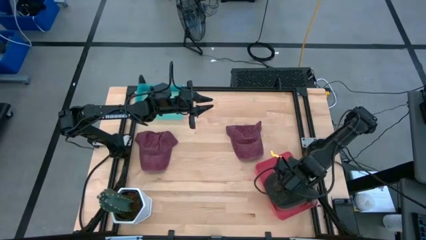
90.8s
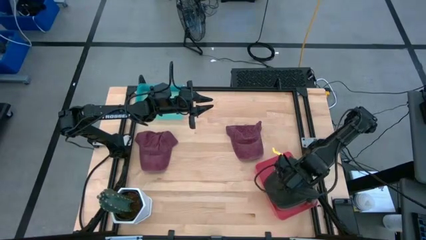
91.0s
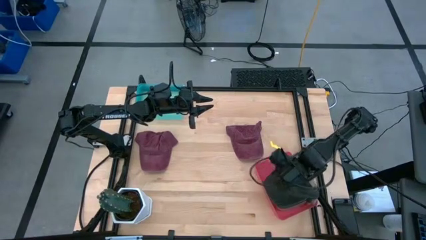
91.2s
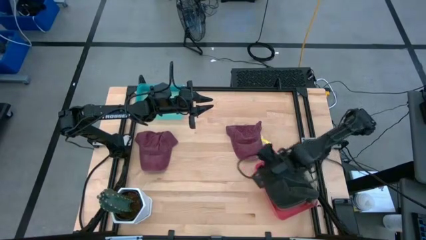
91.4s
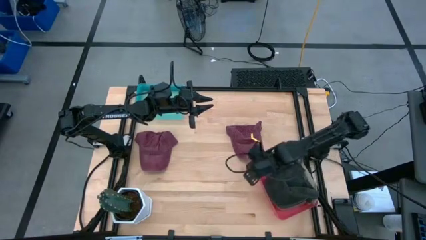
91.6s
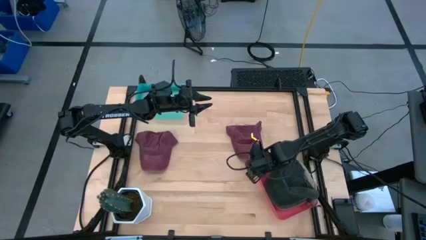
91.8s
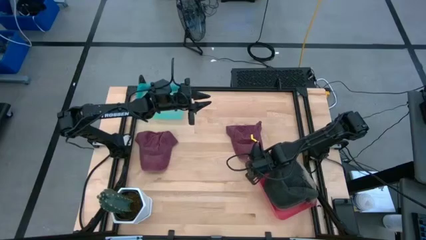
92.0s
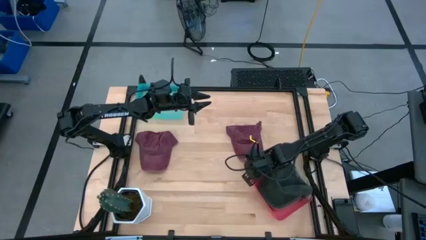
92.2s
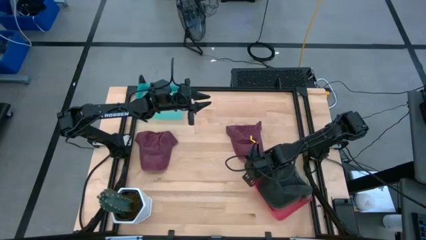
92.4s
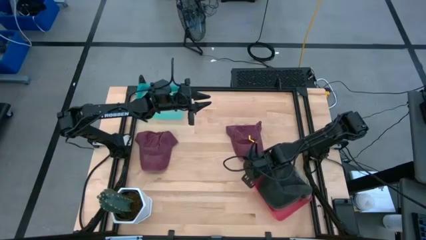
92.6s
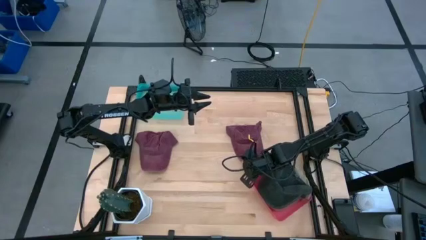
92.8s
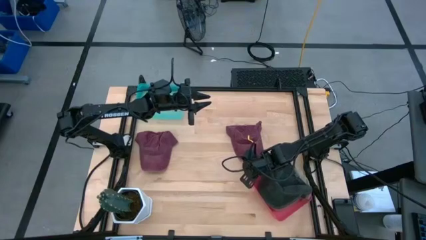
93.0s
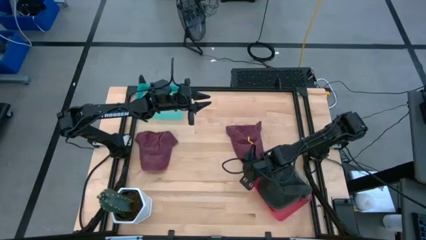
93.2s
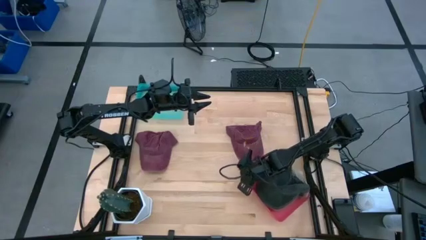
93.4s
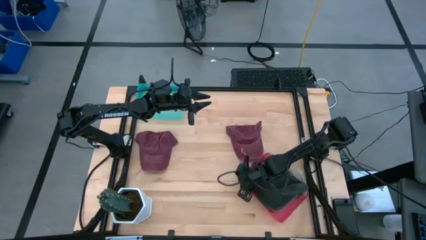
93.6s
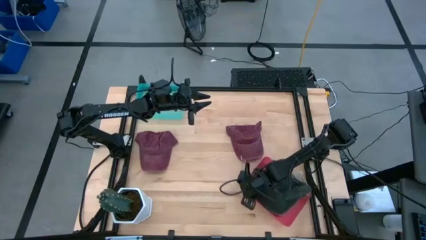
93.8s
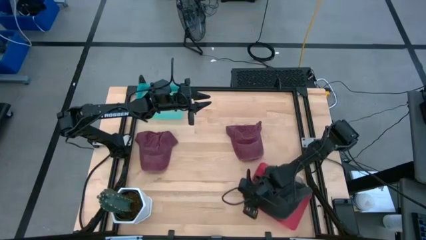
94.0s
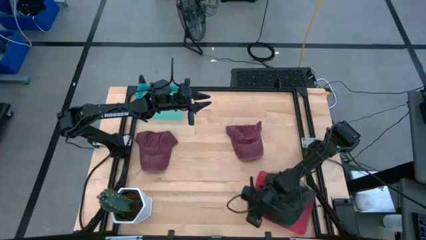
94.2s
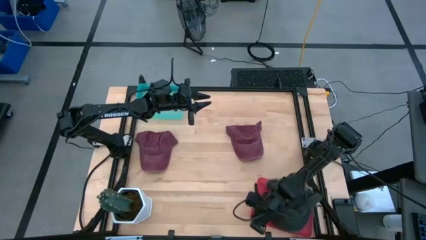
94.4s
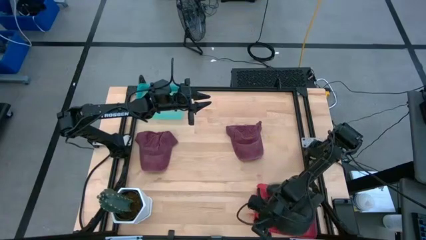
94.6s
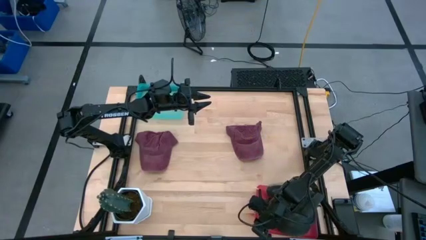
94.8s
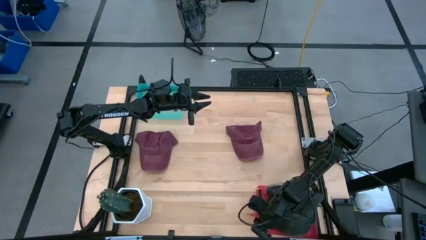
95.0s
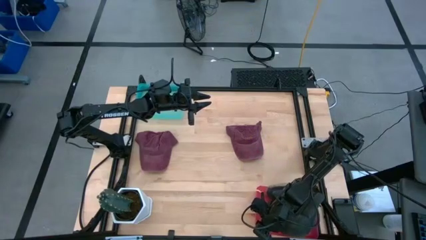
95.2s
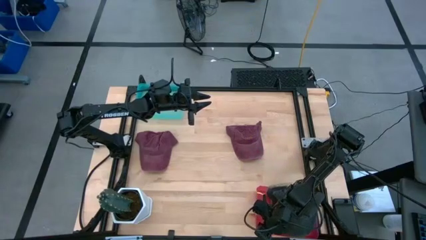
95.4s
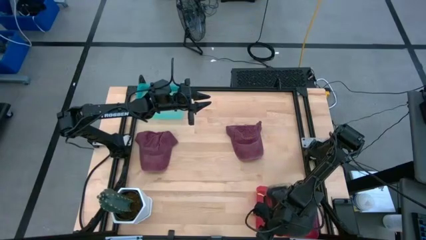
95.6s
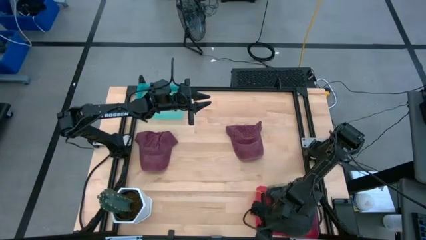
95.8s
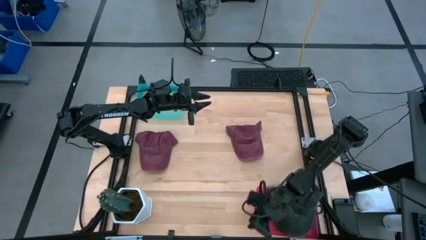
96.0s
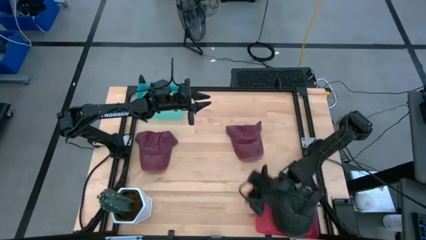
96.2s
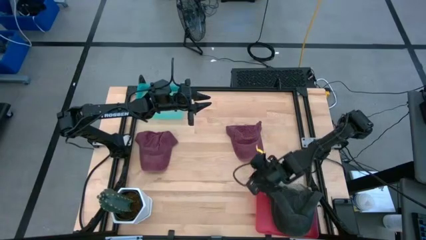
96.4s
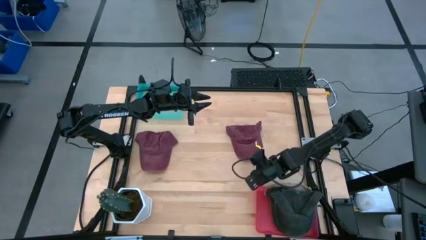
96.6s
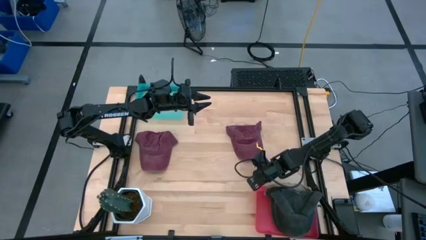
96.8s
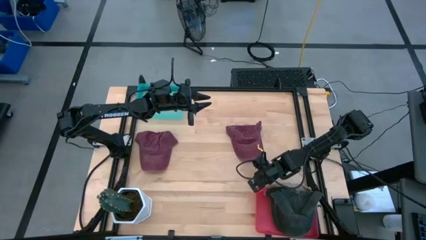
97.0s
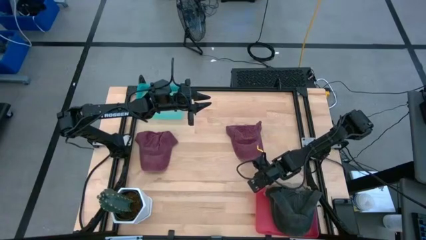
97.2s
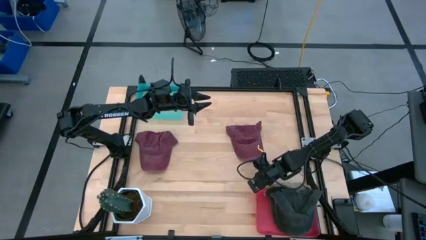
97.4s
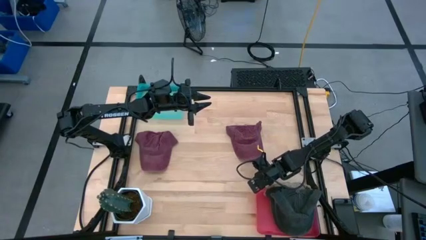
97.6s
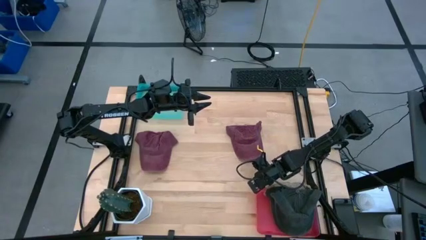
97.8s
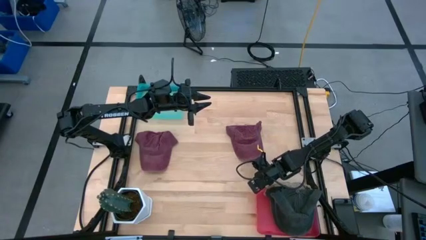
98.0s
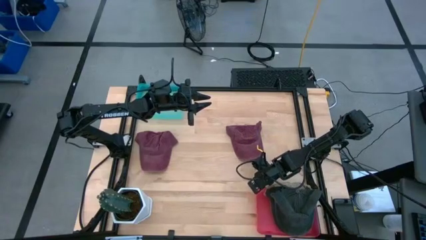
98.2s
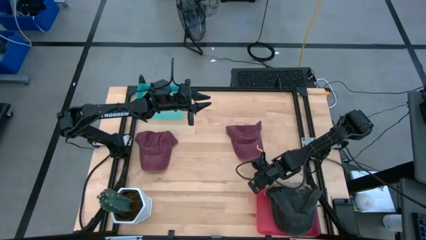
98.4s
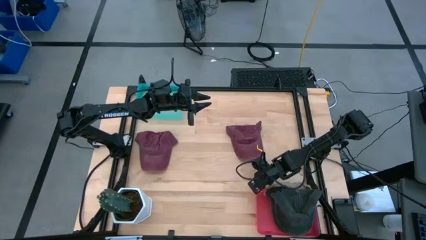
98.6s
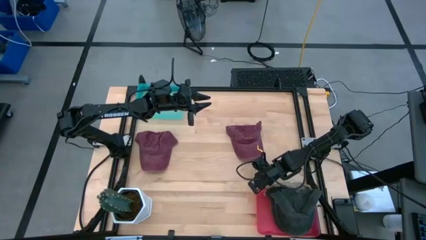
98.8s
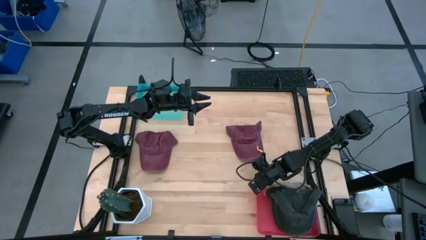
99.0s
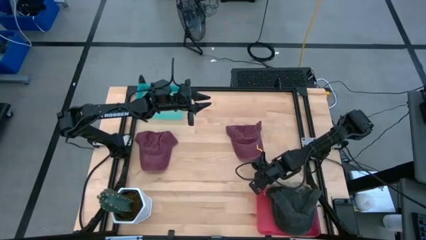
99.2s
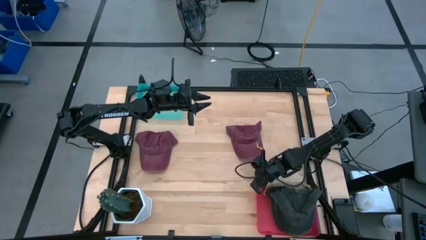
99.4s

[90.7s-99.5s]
Task: Pick & Place hat
Adjust the pink bin on the table

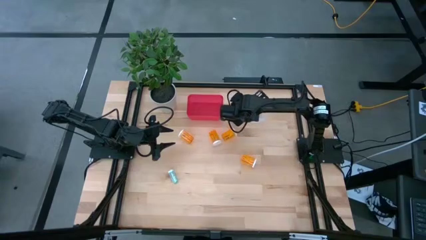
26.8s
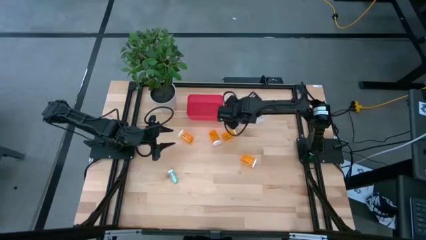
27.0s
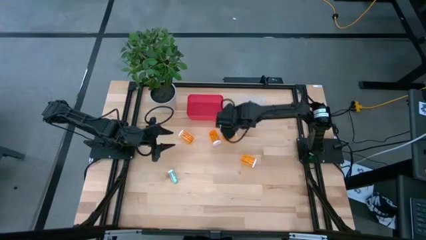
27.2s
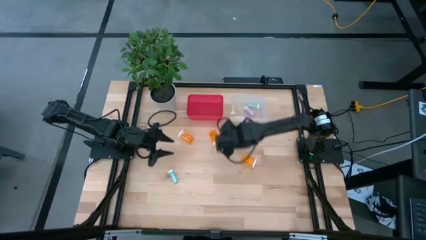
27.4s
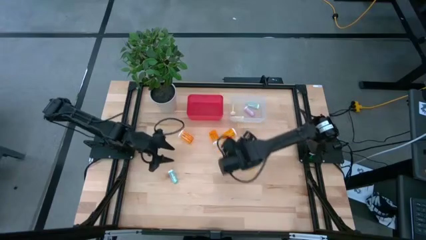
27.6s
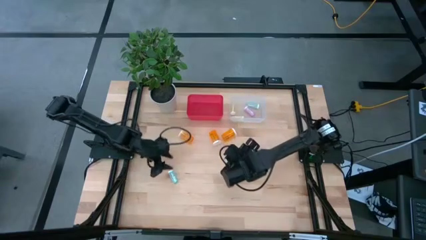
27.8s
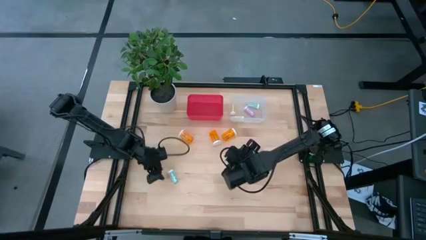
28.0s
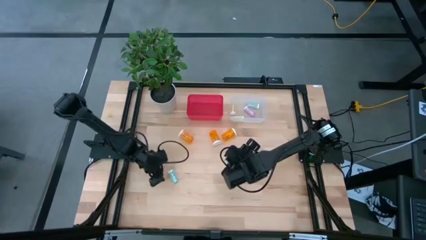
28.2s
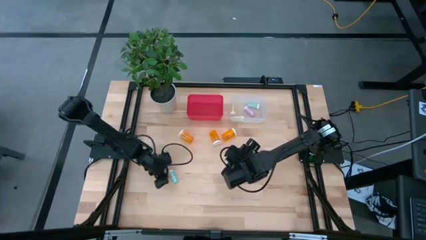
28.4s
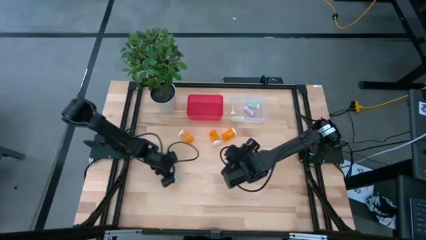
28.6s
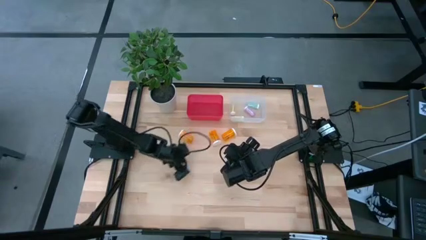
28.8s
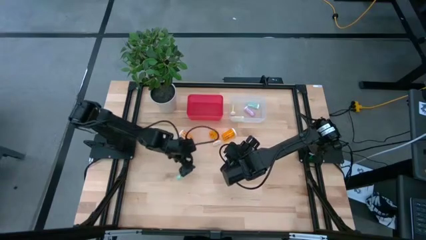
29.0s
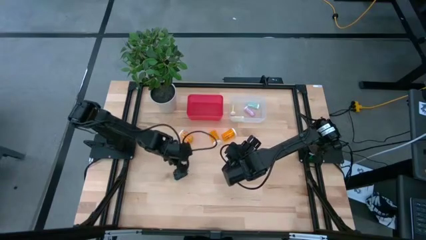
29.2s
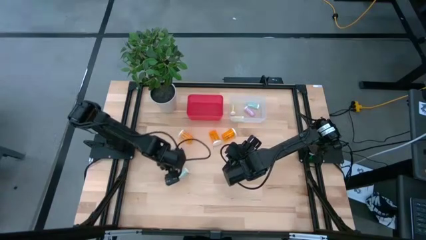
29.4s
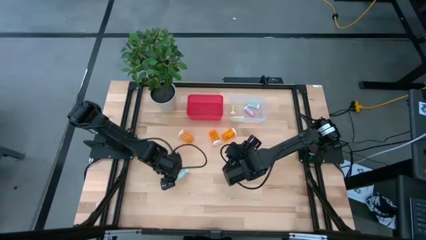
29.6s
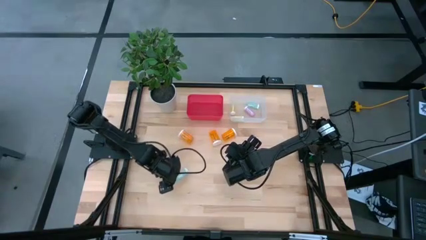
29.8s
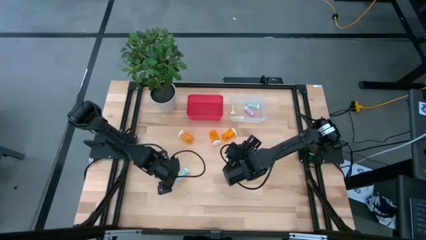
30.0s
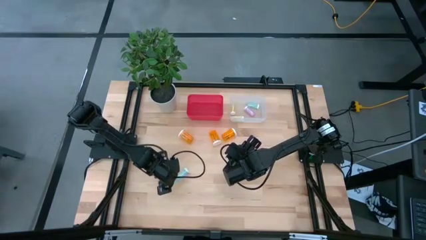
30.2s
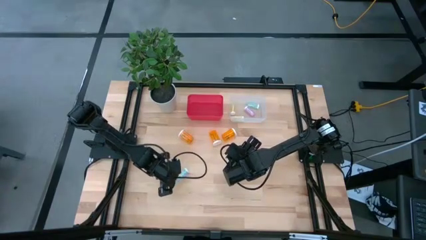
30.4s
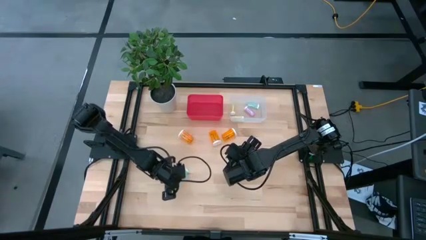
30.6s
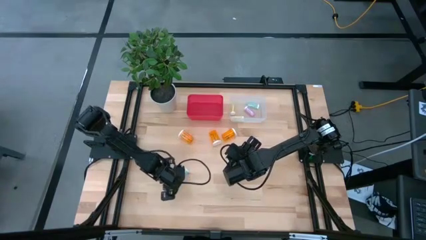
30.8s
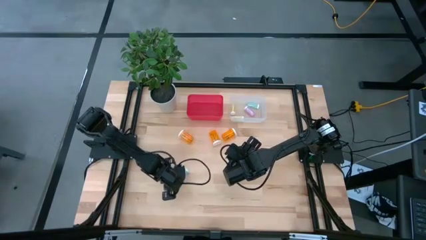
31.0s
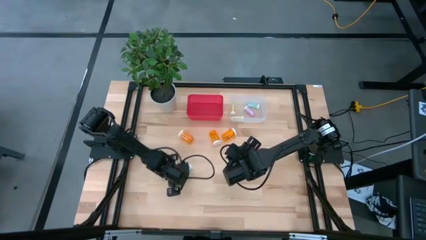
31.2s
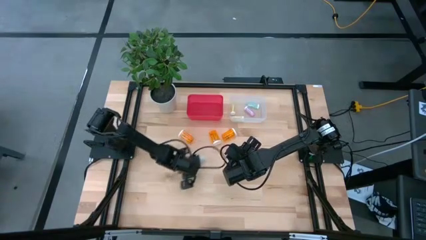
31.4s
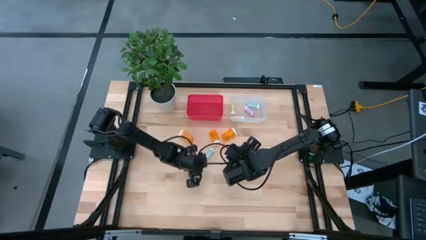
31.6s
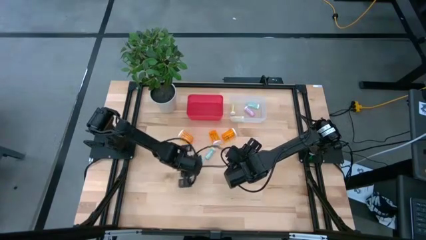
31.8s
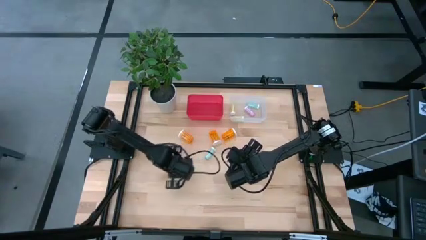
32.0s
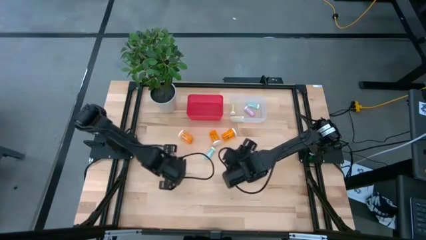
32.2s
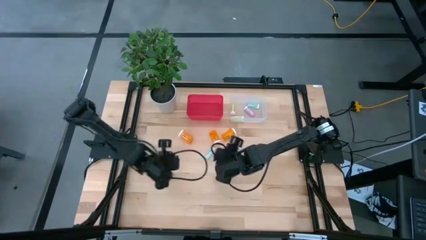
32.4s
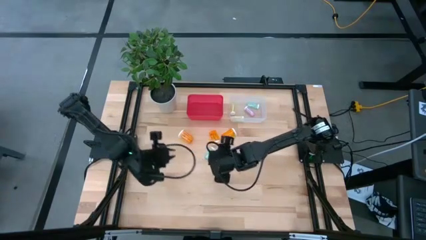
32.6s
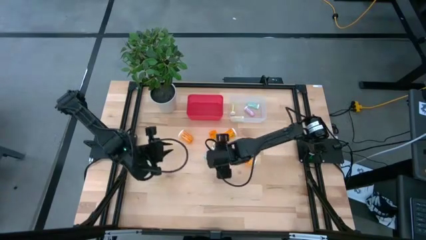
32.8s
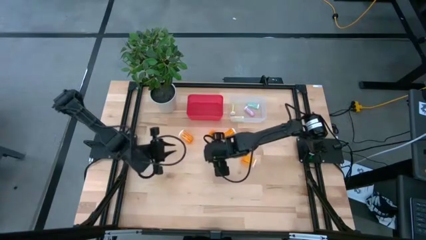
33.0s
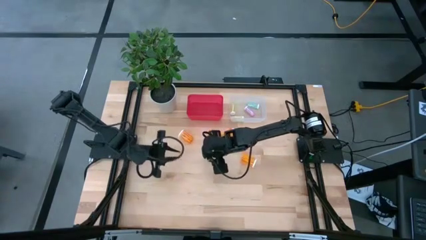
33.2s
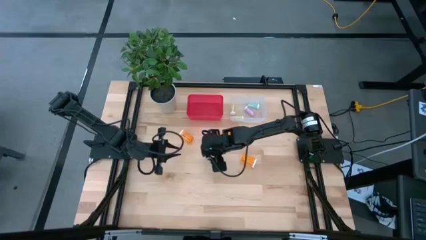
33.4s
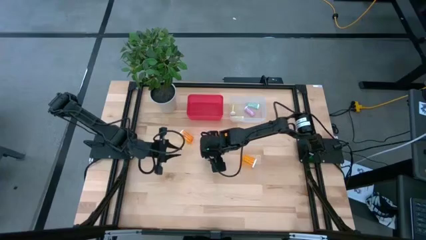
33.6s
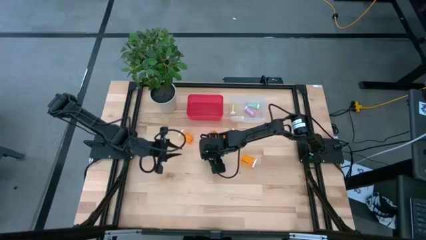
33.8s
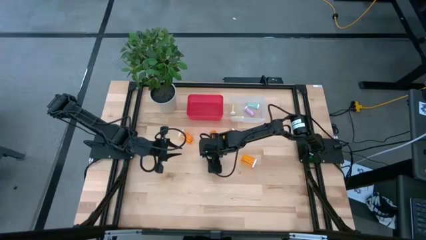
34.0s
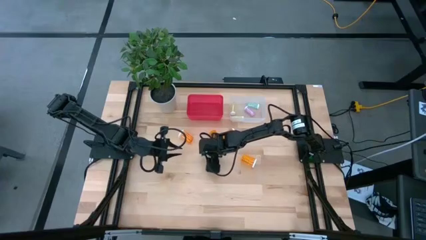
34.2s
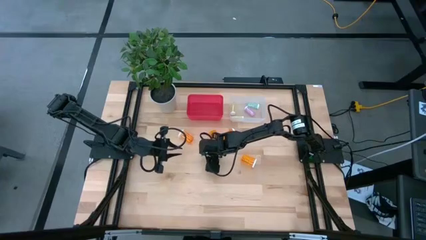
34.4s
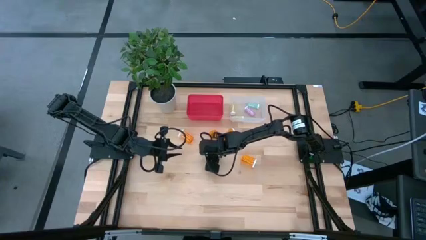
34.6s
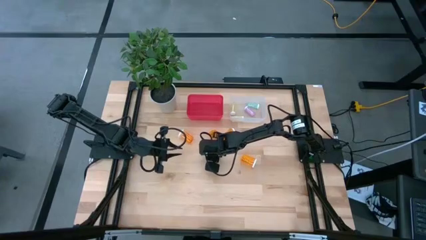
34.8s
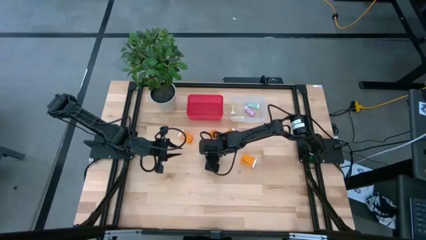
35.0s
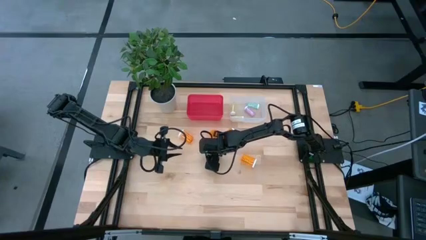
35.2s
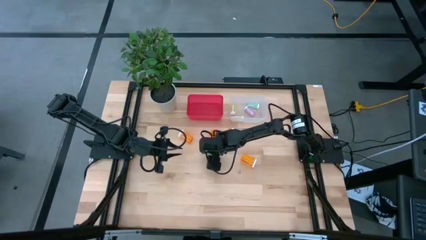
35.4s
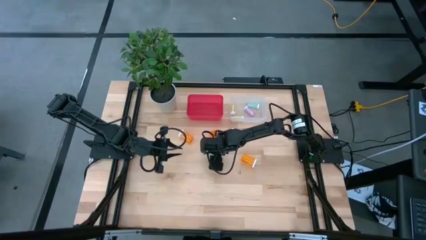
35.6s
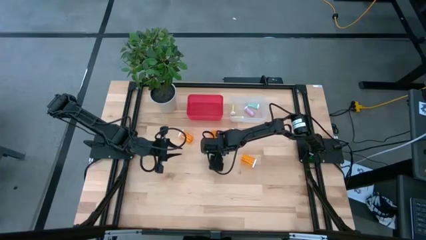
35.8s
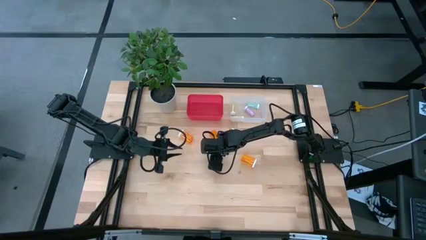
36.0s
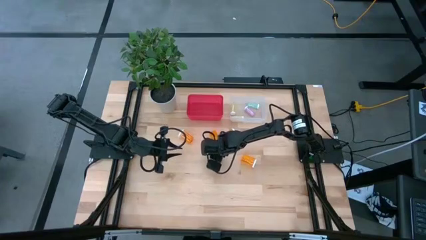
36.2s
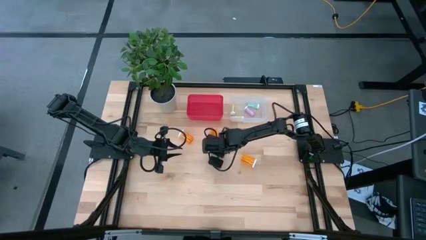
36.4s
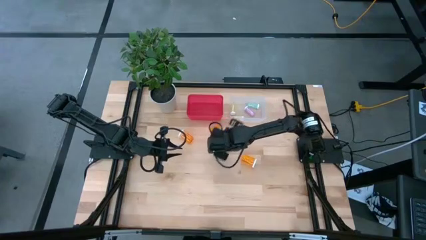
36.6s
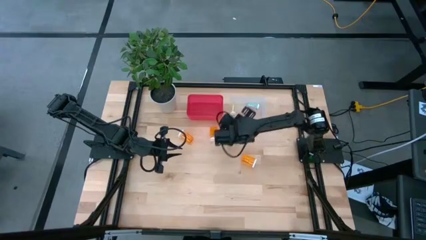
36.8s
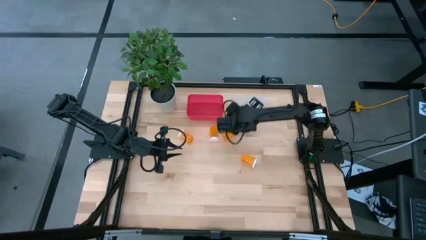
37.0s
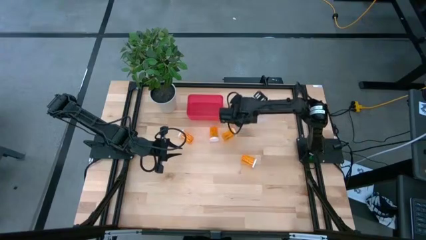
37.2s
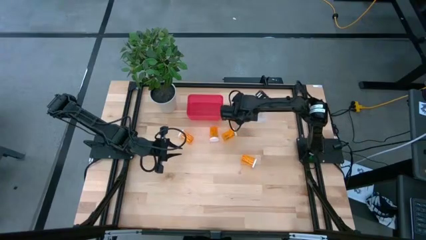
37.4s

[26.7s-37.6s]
Task: Pick and place medicine bottles into bin by pill shape (circle, oval)
Put the blue tablet bottle into the transparent bin
